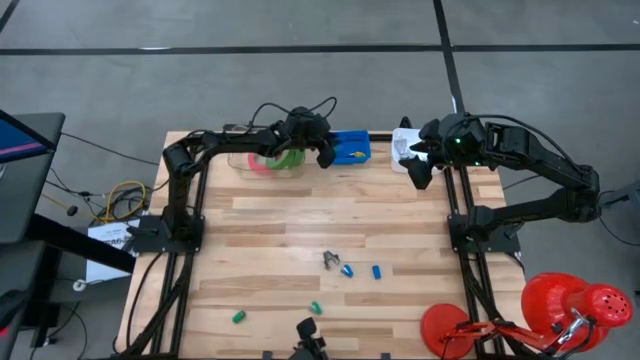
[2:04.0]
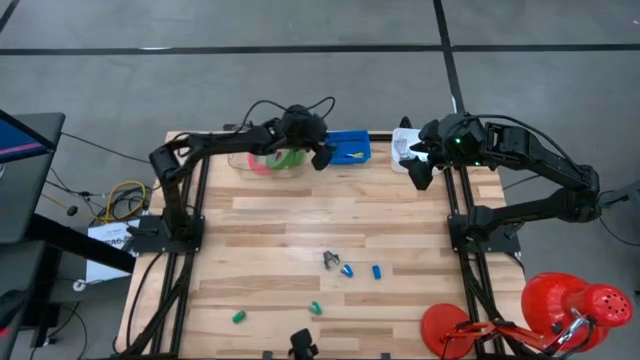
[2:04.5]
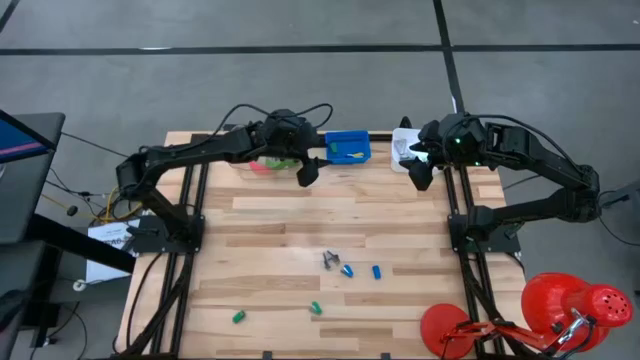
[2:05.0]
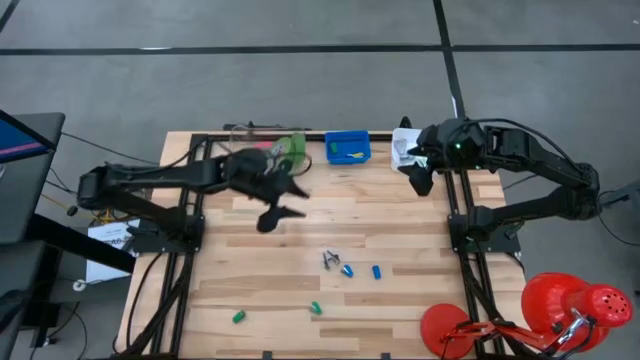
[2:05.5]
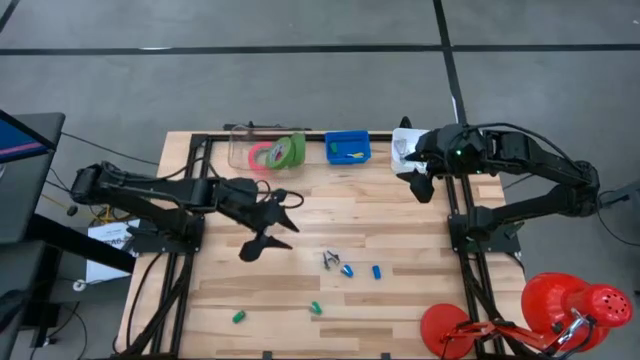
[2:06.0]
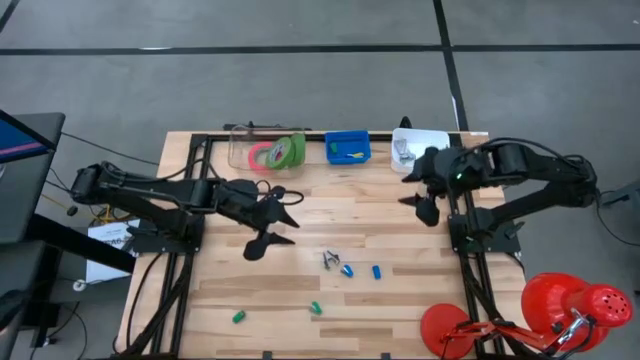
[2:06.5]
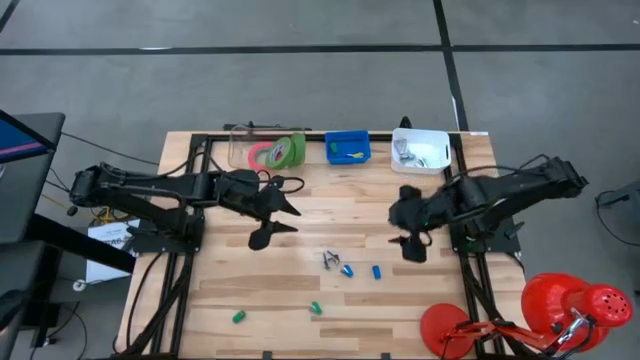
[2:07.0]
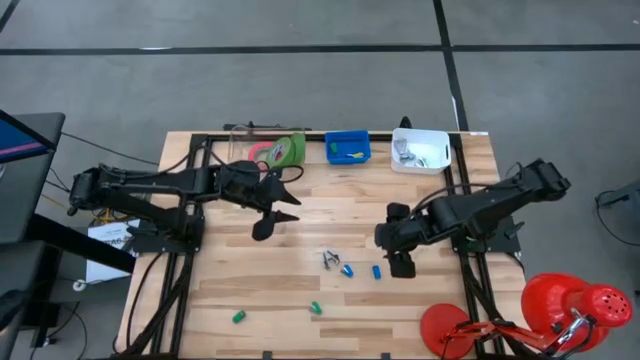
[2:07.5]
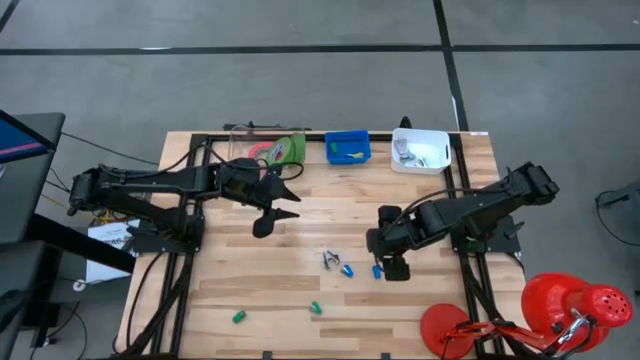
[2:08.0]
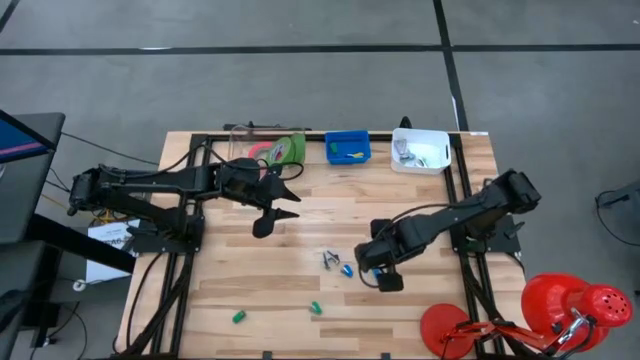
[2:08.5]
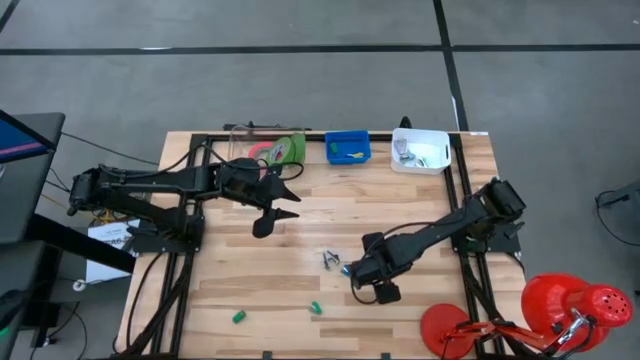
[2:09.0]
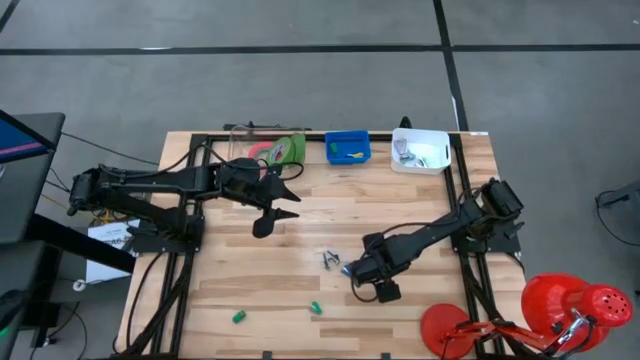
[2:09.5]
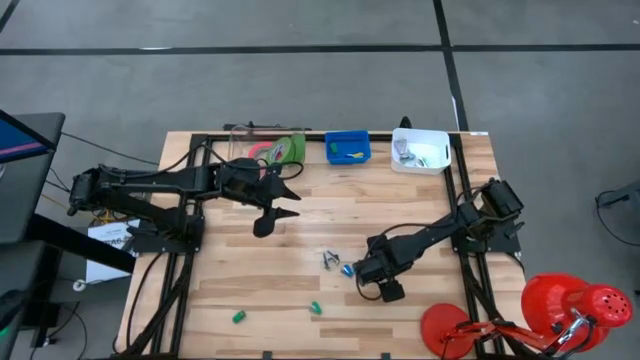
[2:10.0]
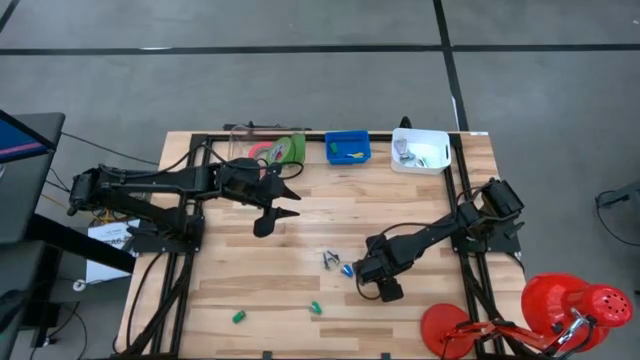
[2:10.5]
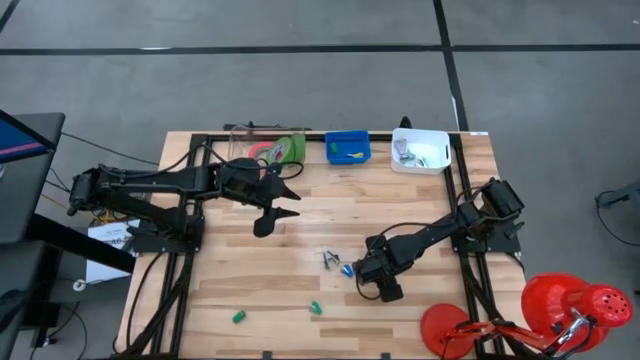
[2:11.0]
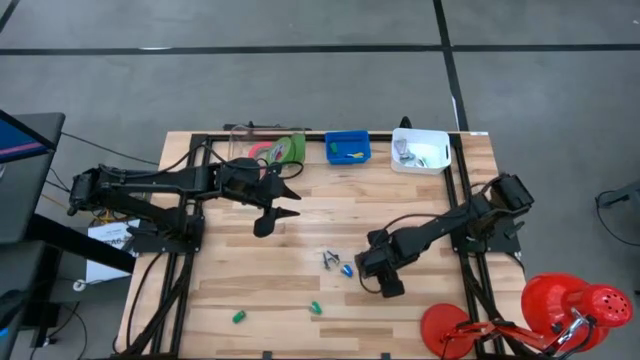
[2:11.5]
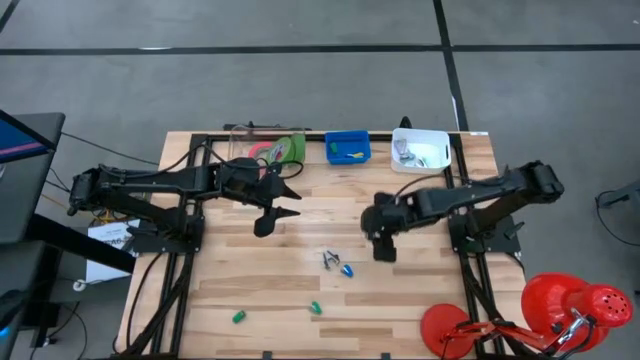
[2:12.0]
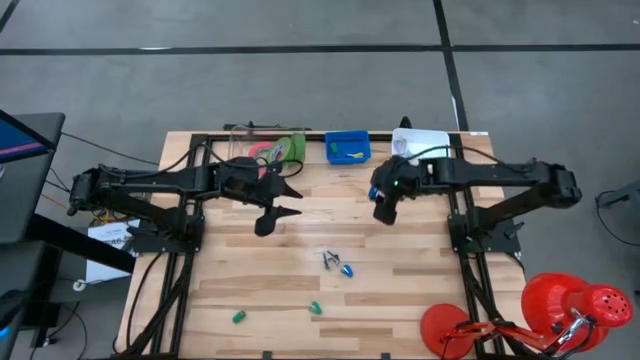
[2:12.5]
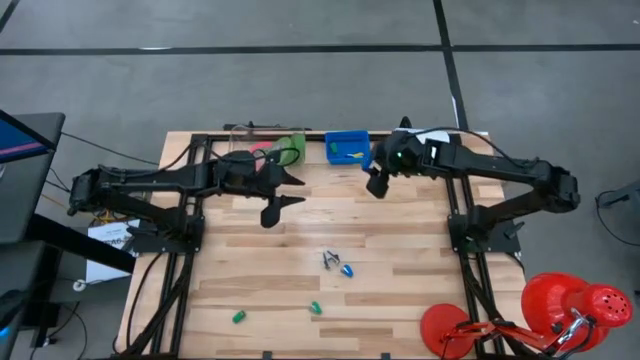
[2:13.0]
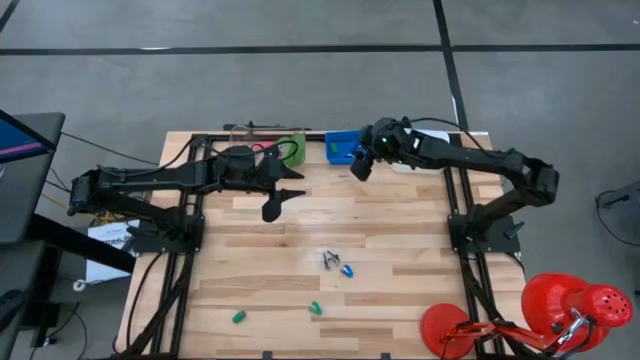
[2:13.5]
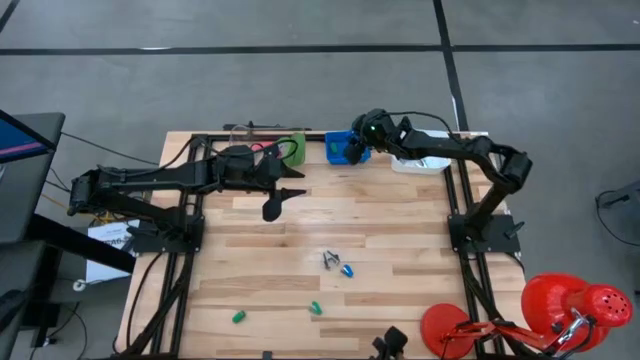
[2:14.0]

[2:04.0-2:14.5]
Task: Pick and place Stapler, Stapler remover, tape
Put the blue stapler into the blue bin

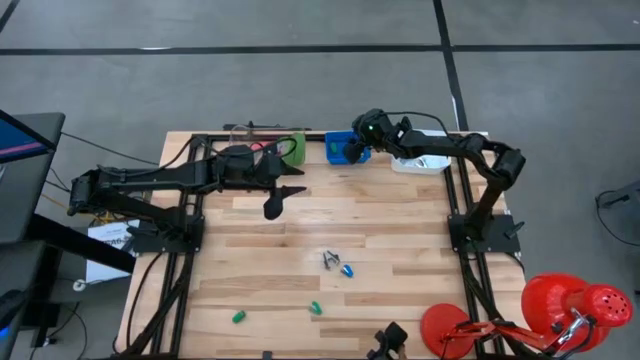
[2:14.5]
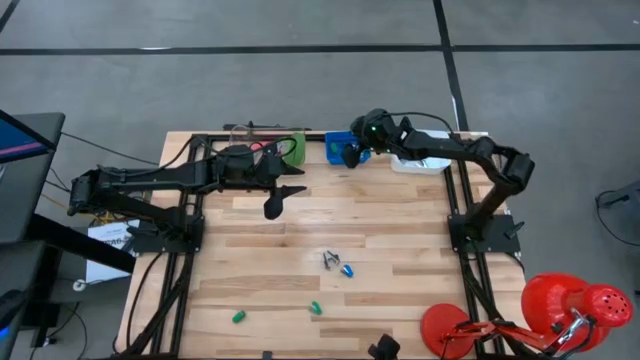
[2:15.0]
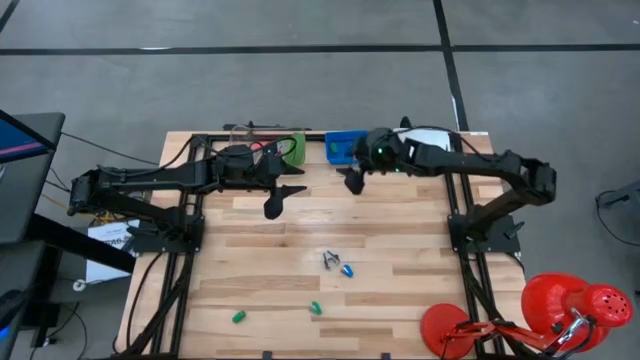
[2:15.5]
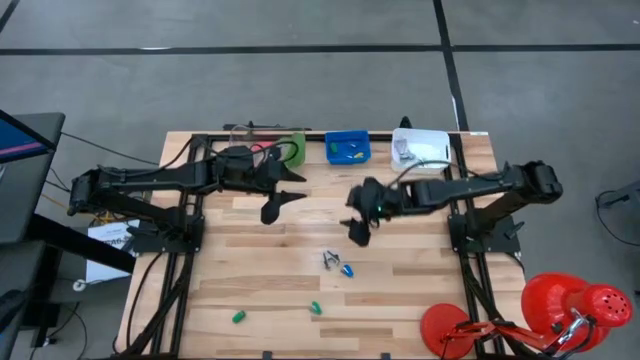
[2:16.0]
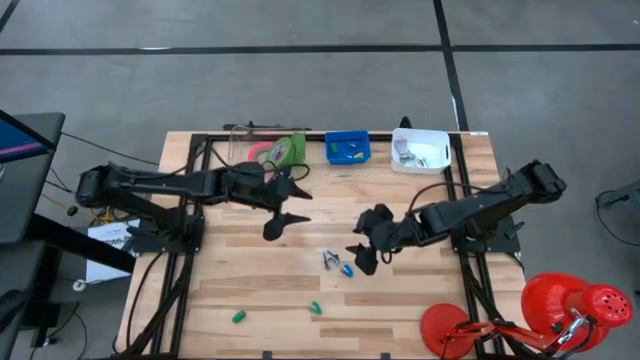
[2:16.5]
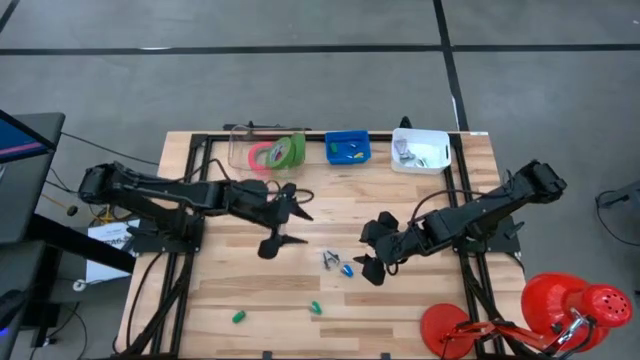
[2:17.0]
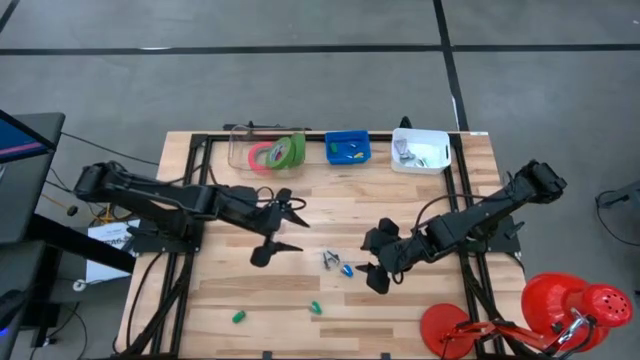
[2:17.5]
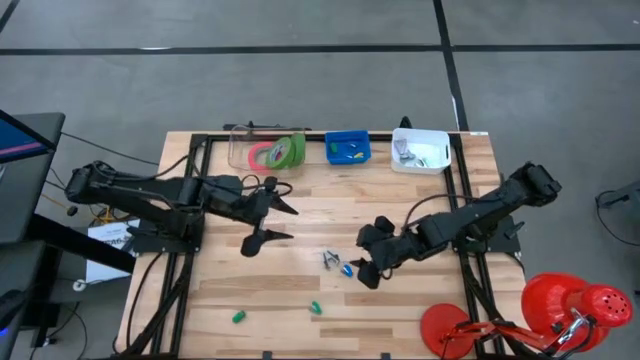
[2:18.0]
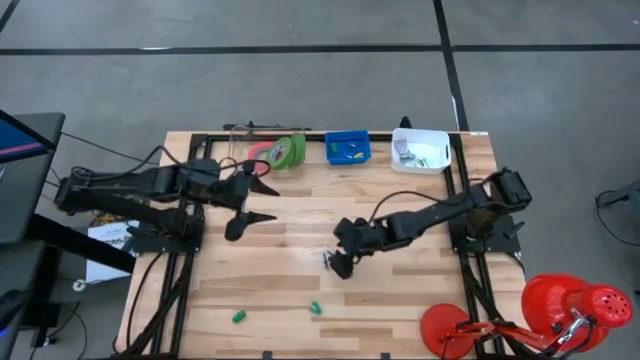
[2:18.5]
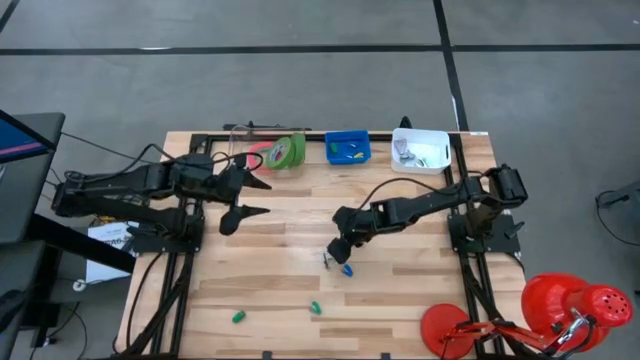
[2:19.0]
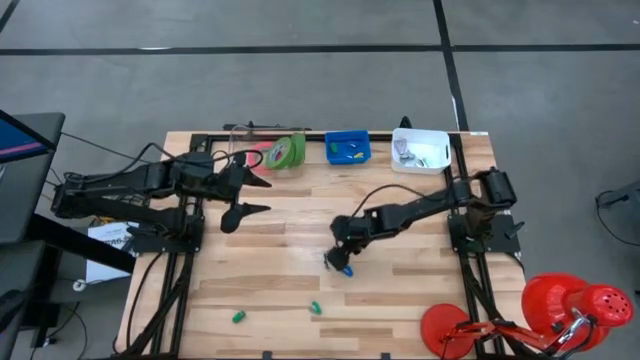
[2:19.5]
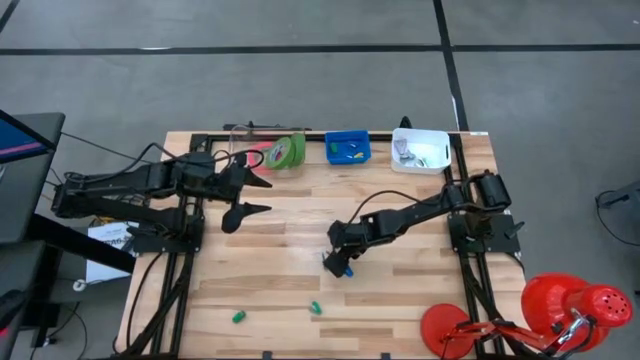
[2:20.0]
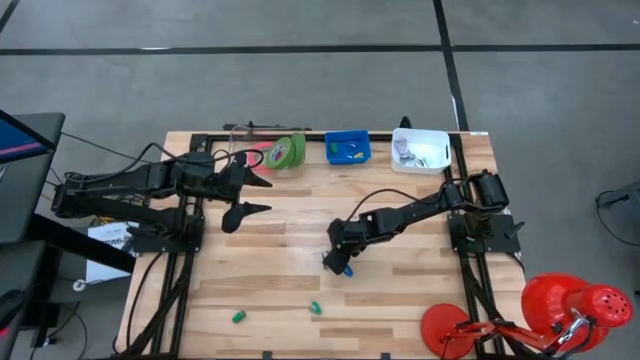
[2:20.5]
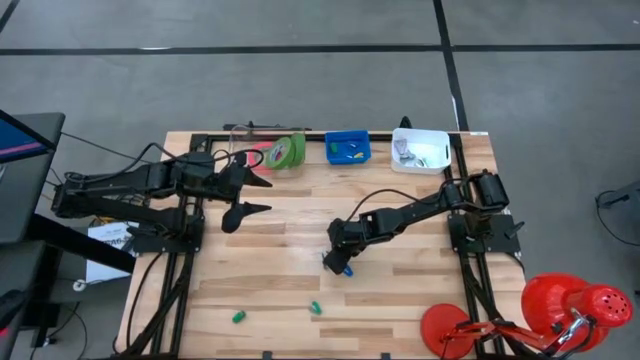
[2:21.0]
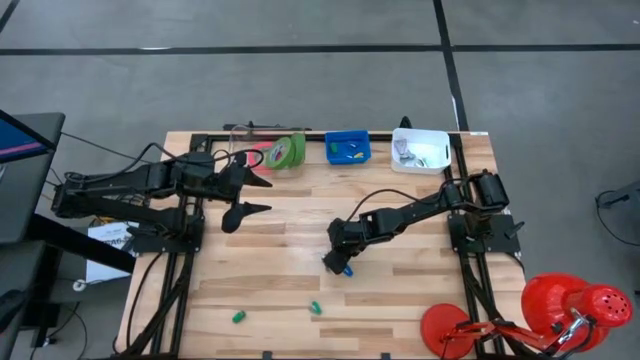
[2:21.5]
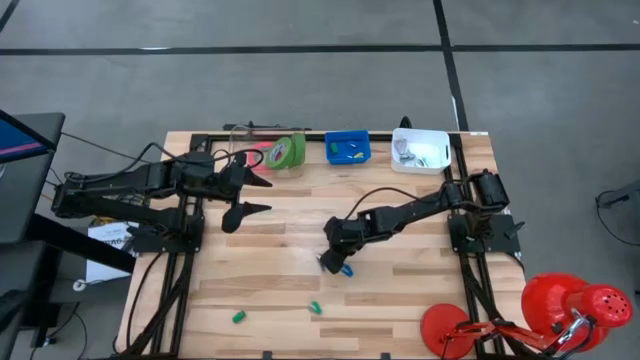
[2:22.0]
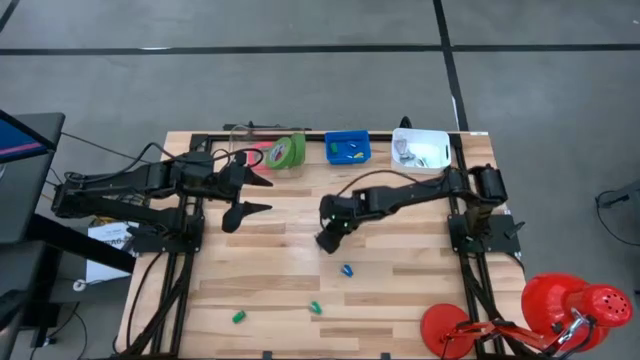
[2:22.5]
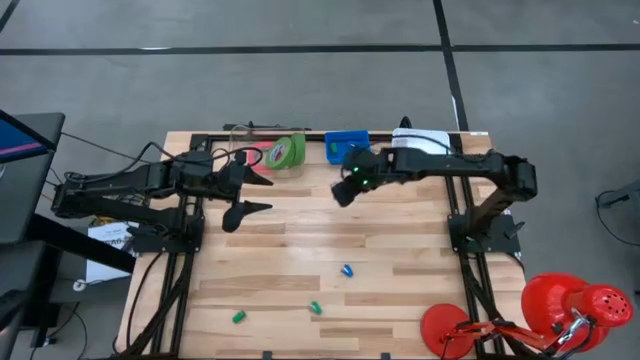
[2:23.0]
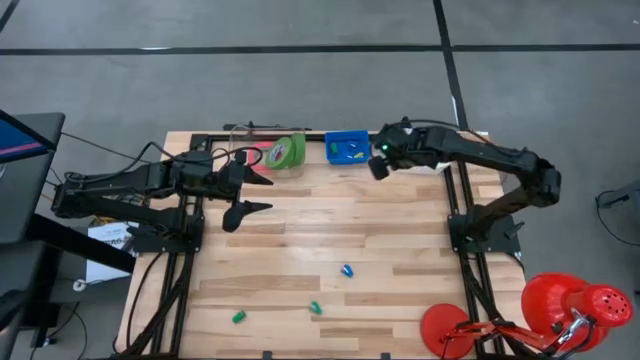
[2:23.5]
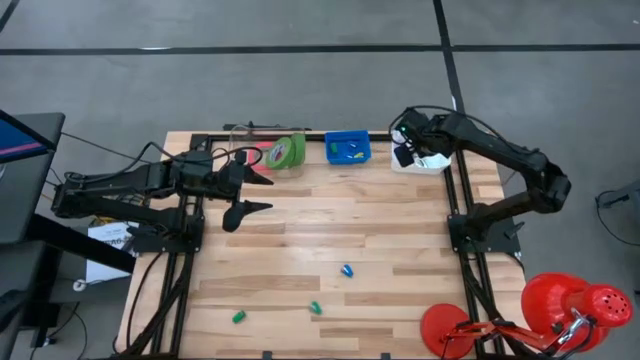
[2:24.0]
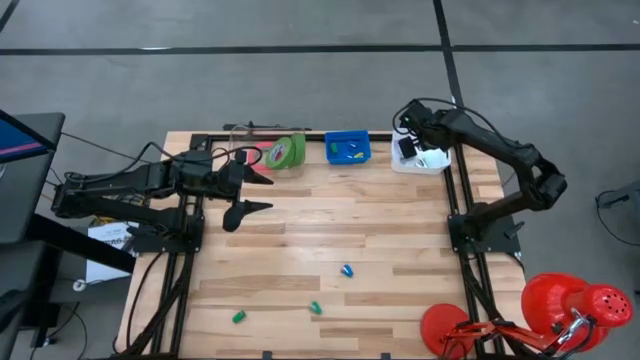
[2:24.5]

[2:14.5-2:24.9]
Put the black staple remover into the white bin
